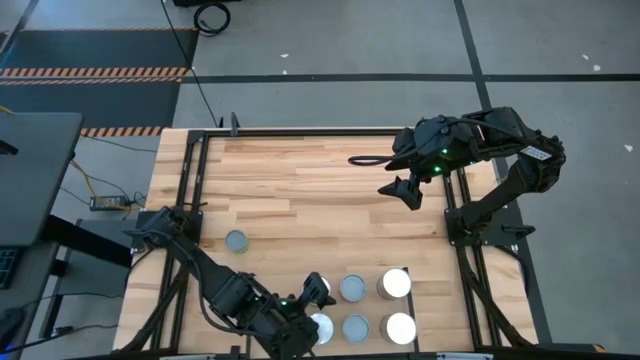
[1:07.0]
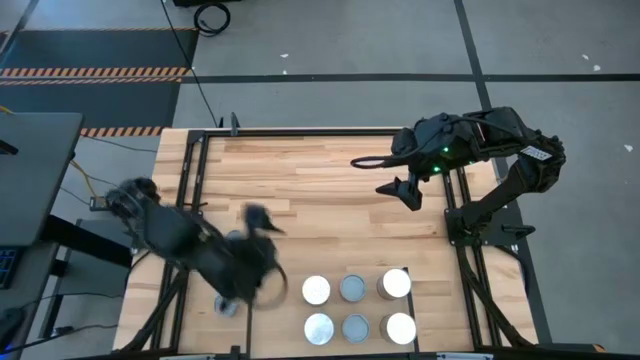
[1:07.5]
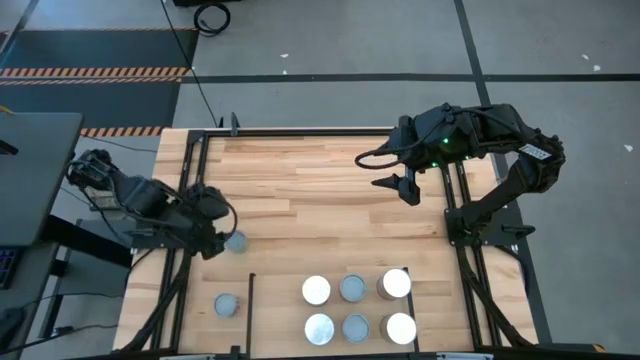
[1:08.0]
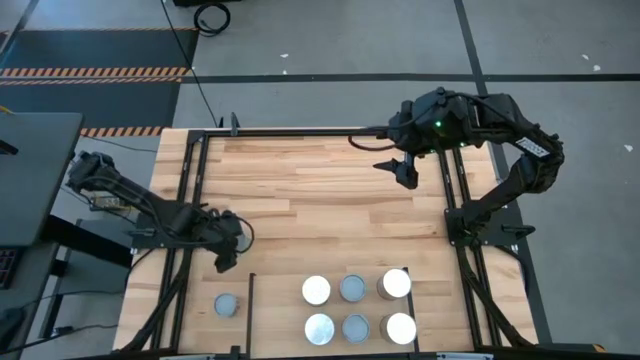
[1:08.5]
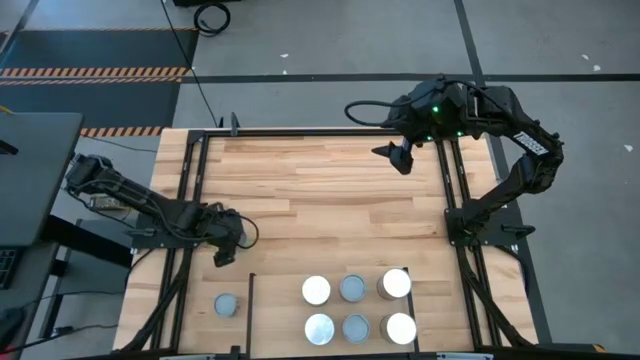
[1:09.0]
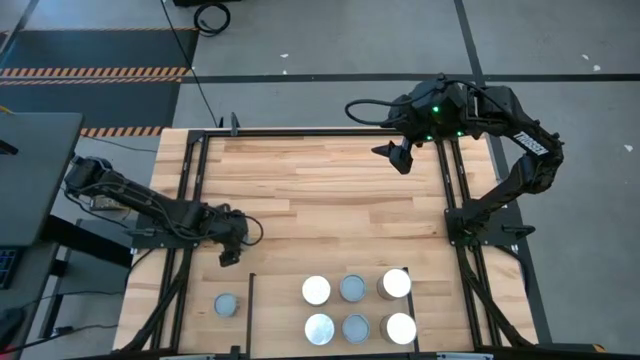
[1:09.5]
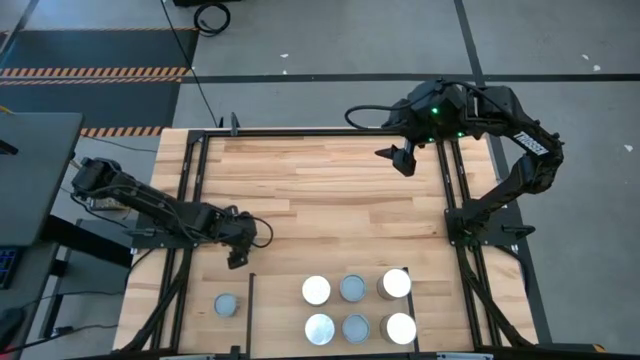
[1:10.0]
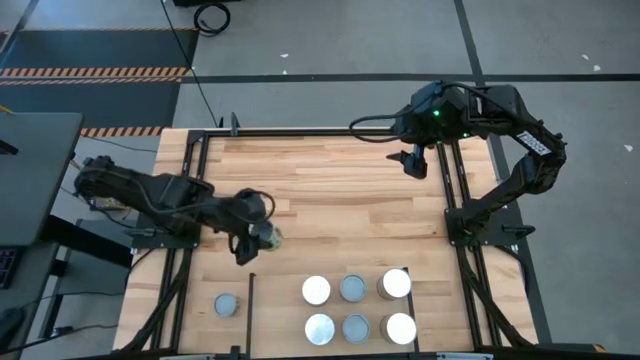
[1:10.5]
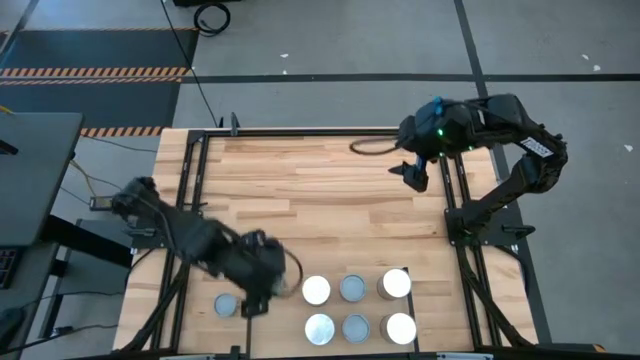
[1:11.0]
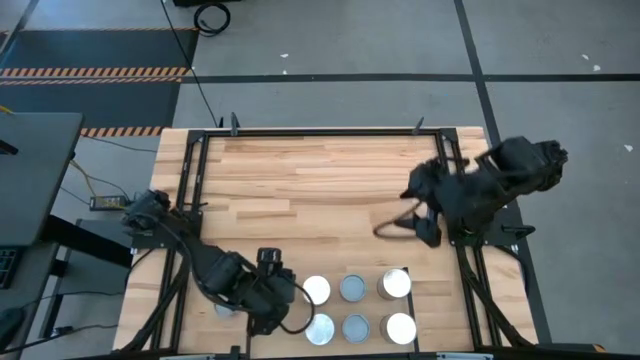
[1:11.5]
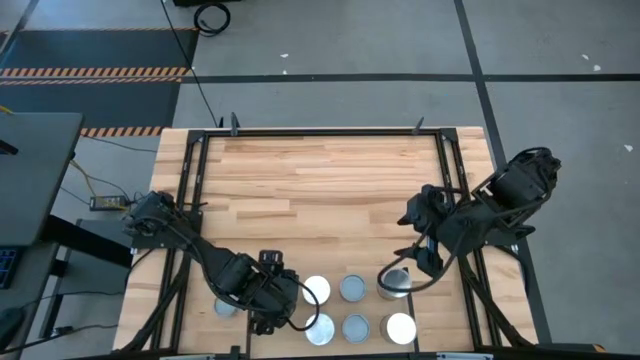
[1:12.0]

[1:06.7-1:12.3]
Task: Pick and place cans onto a shelf
Put the canned green peas on the shelf

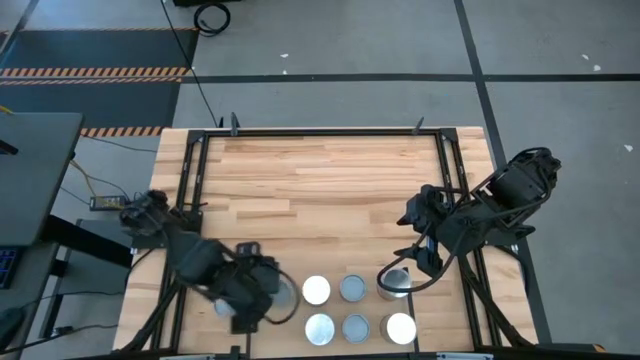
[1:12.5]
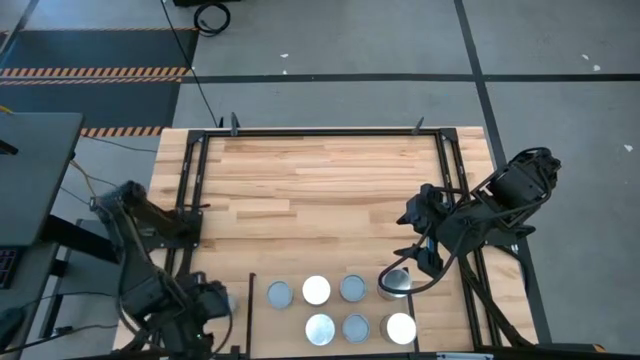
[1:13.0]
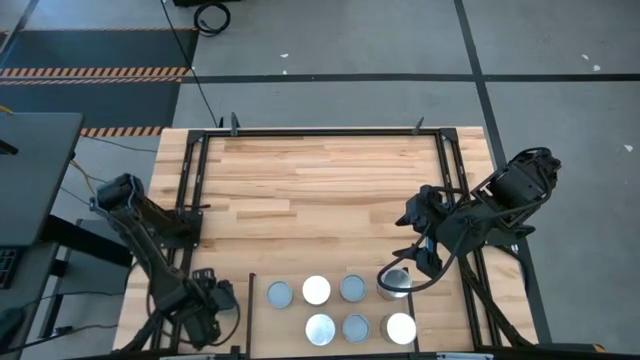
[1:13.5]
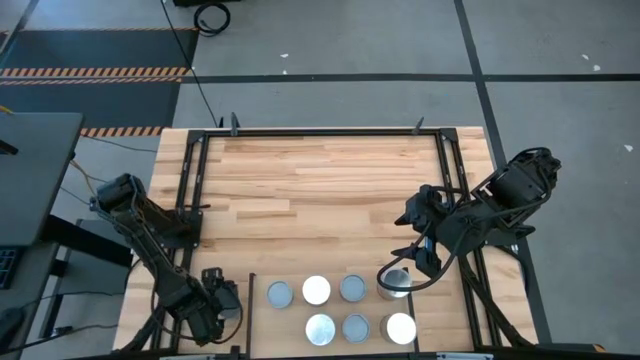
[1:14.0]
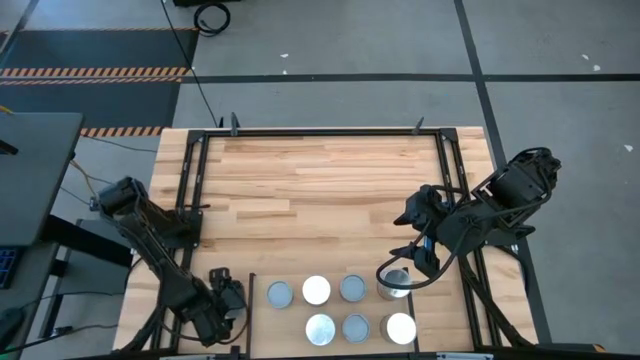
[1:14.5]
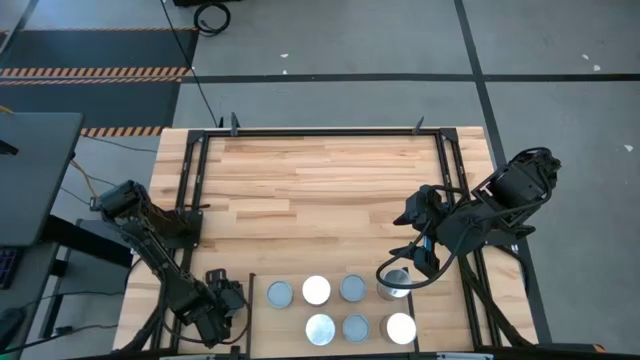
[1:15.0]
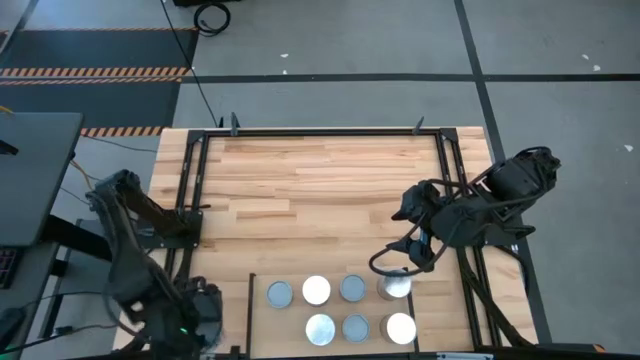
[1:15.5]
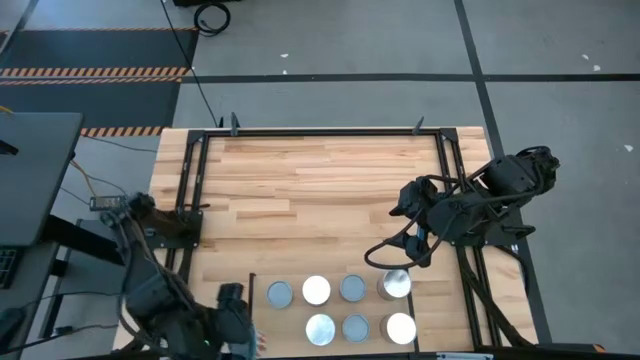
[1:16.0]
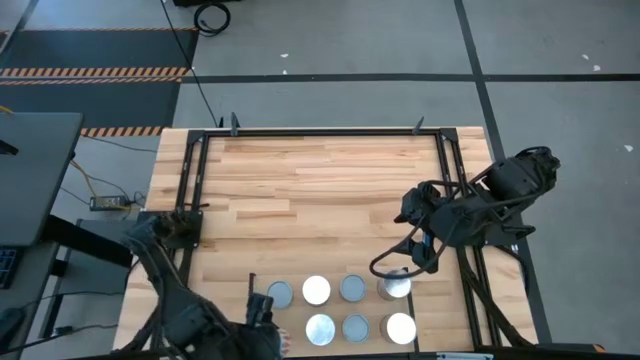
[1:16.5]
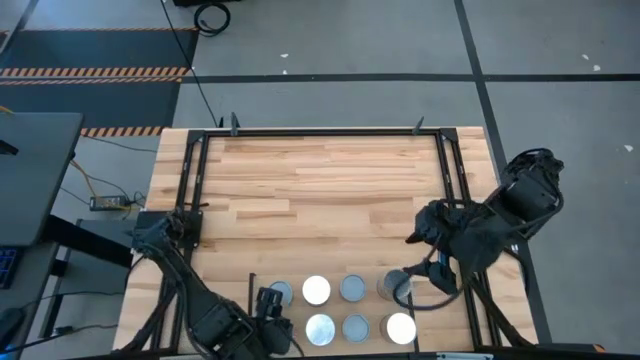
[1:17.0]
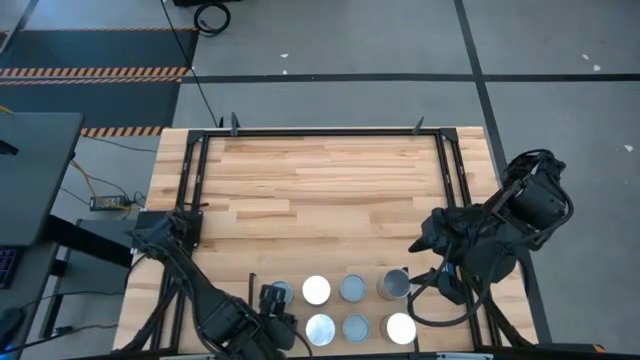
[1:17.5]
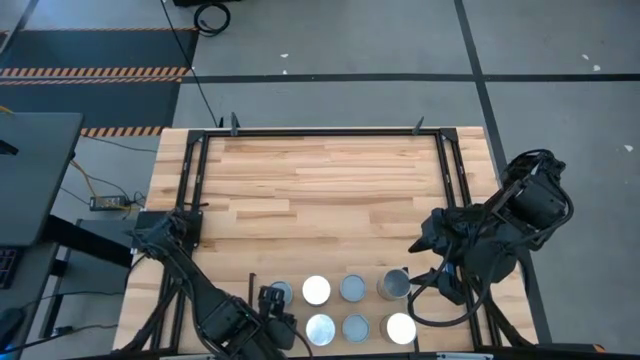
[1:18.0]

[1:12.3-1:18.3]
Put the canned carrots on the shelf

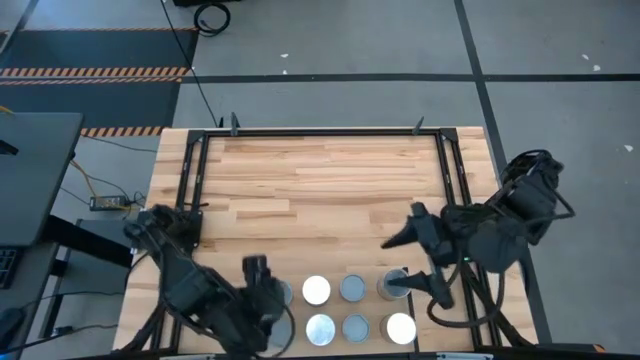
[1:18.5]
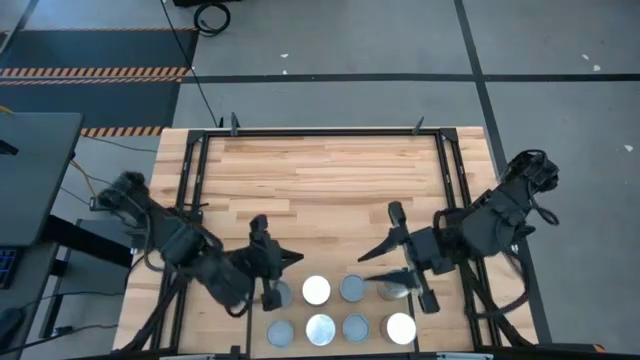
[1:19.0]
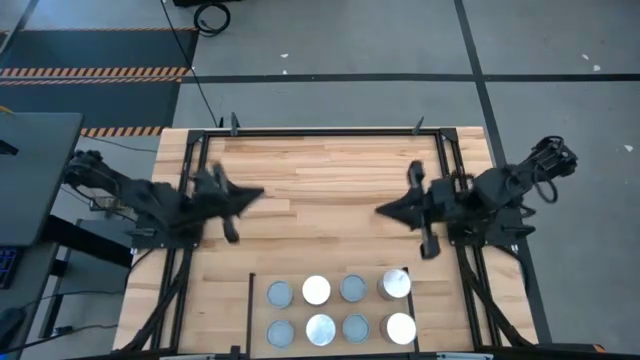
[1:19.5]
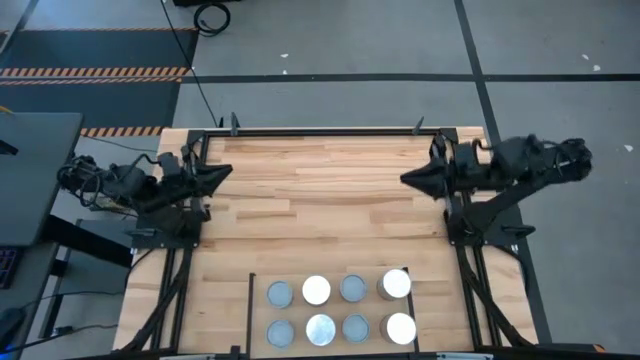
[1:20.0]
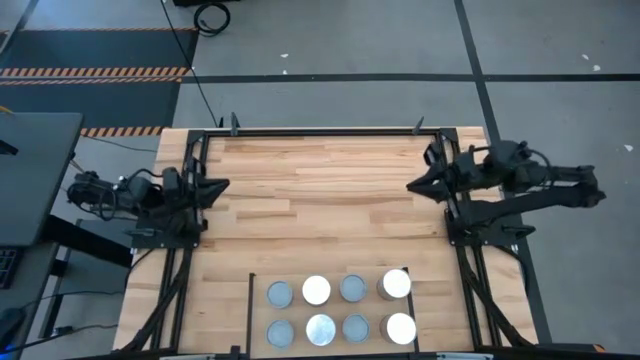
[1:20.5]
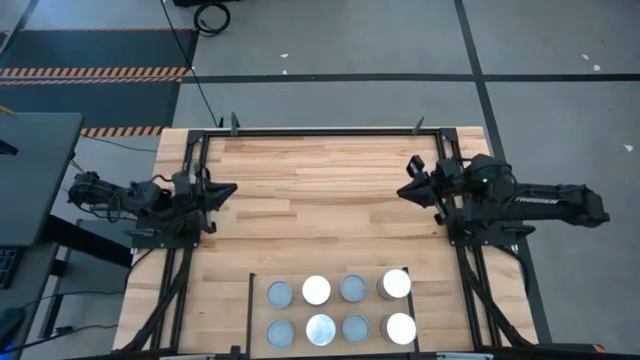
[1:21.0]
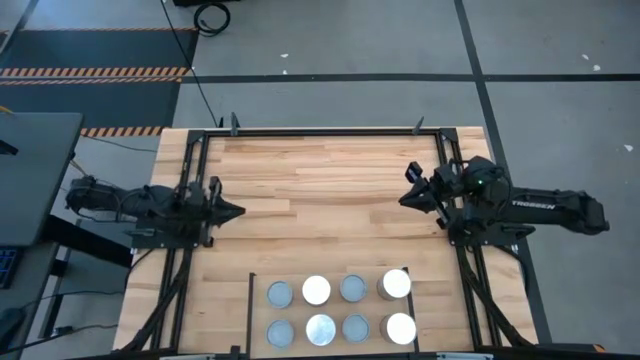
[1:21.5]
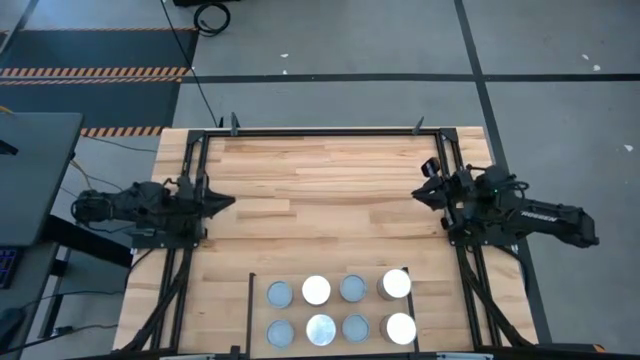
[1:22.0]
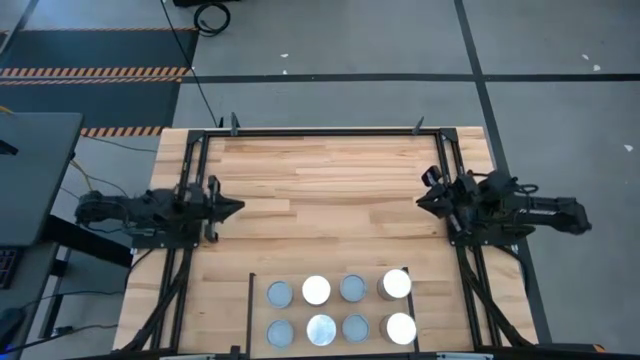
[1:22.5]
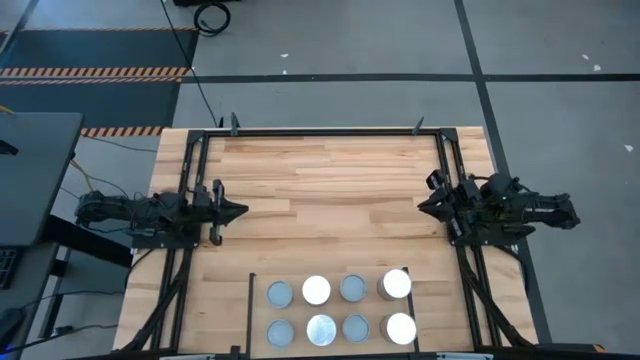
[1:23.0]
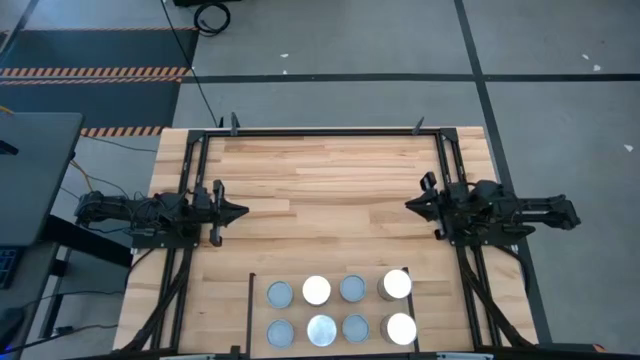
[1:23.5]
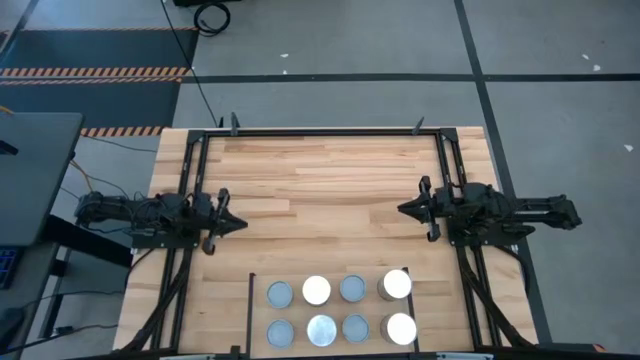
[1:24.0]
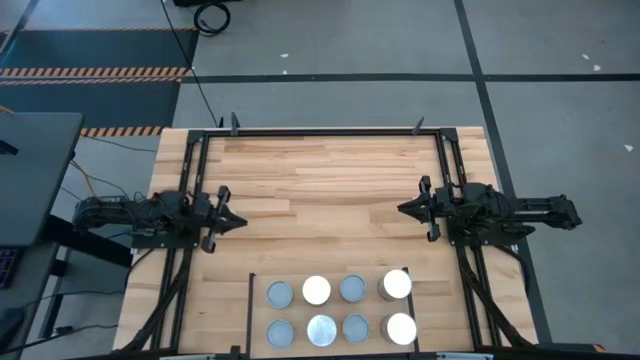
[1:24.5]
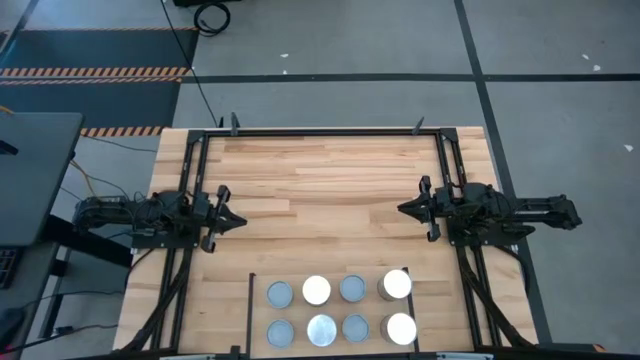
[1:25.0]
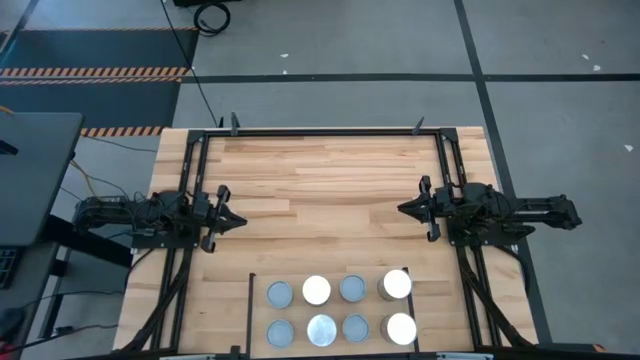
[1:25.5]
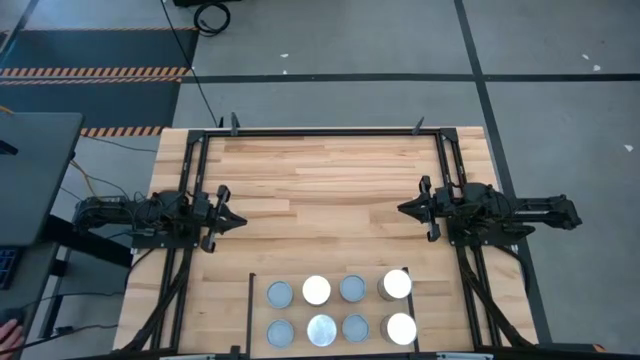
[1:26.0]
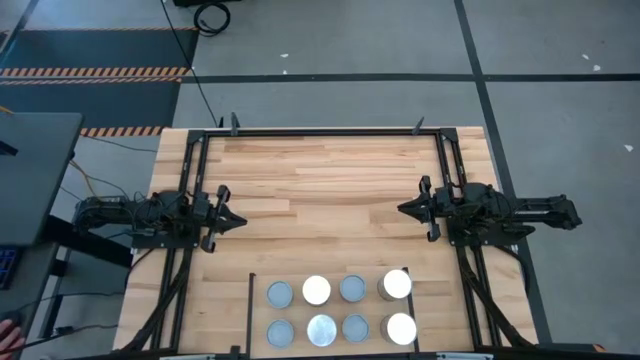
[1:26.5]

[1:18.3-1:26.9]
Return to Home Position

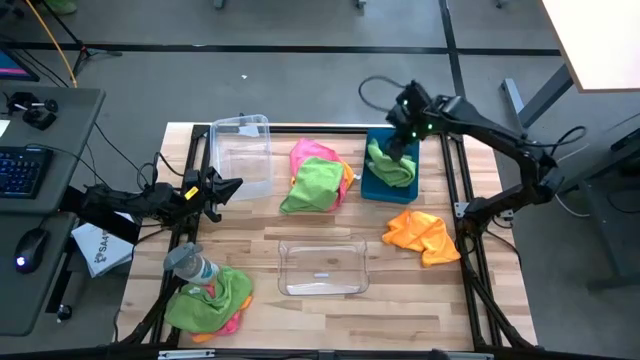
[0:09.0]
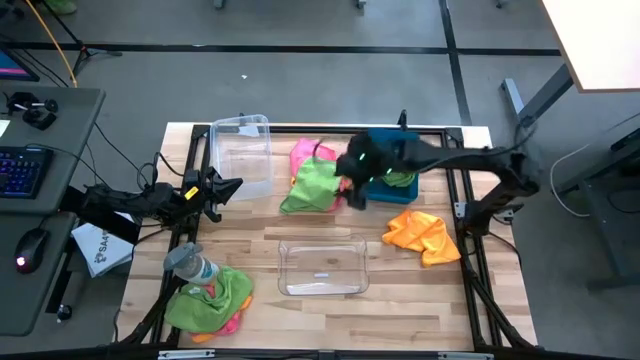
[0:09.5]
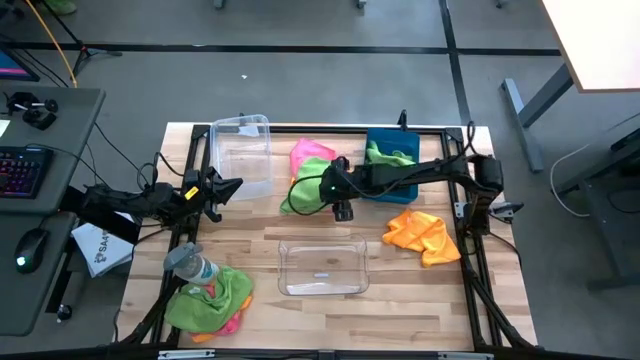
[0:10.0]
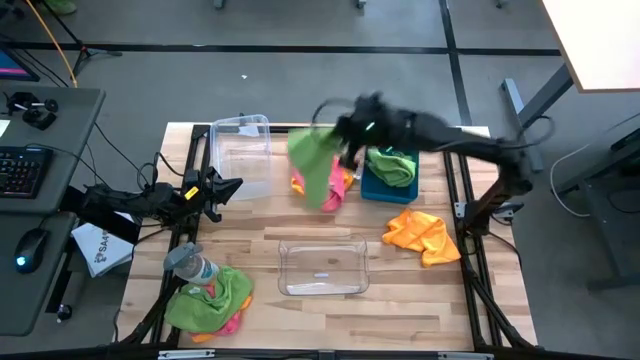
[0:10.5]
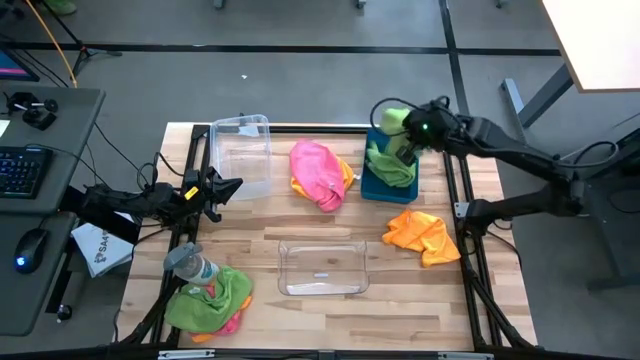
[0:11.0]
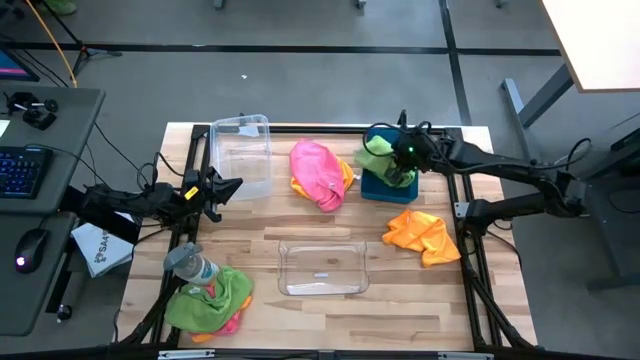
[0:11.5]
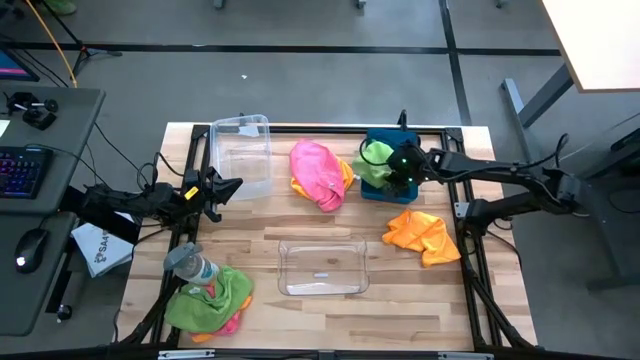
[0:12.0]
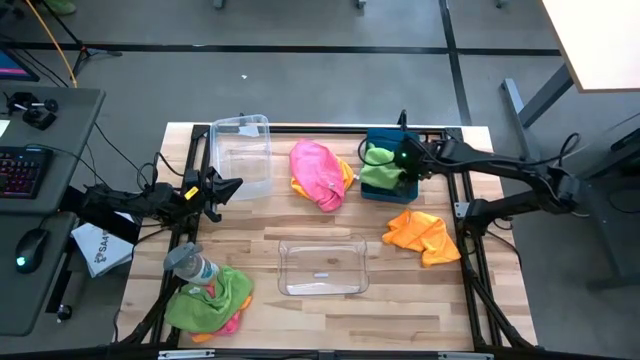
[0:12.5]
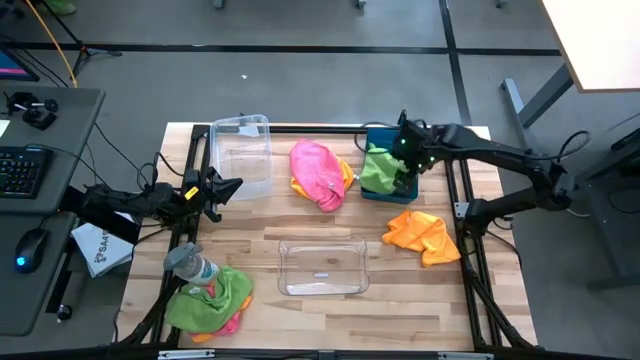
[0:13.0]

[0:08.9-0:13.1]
Task: Sort microfiber towel by color & place in baskets
Put the top green microfiber towel into the blue bin
